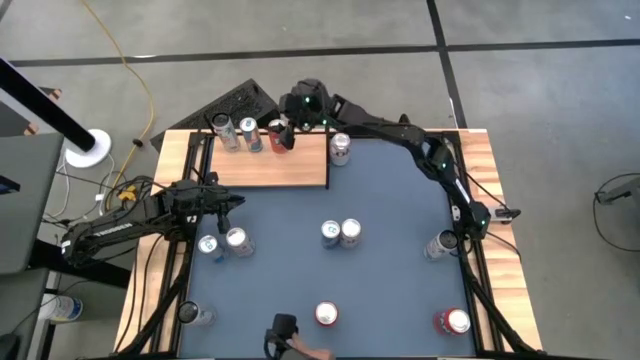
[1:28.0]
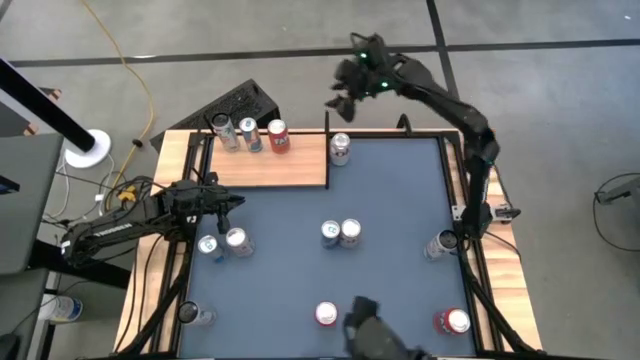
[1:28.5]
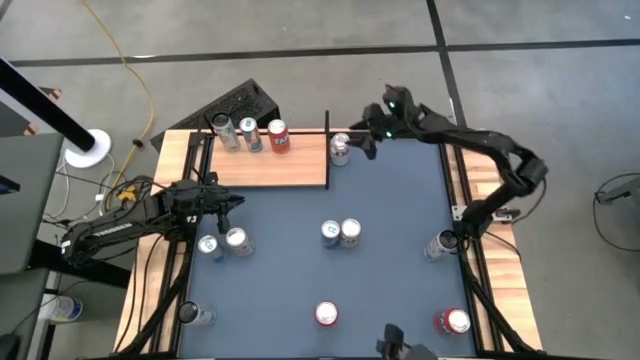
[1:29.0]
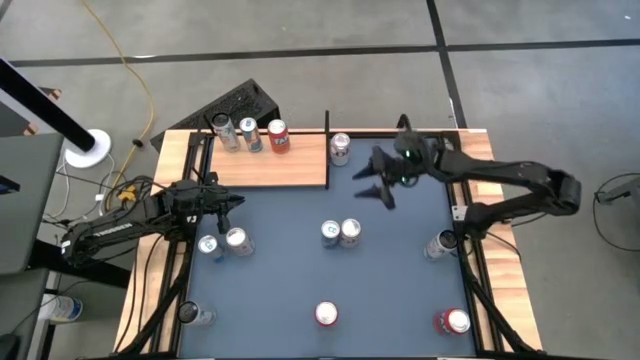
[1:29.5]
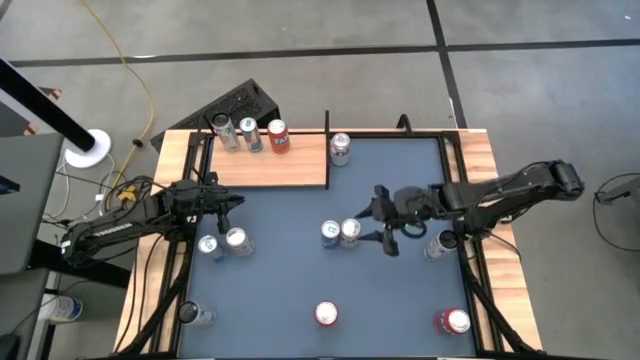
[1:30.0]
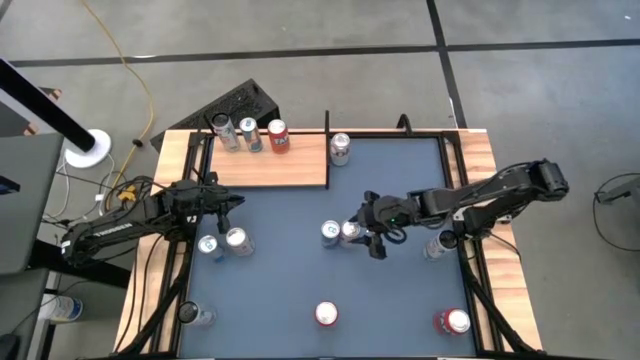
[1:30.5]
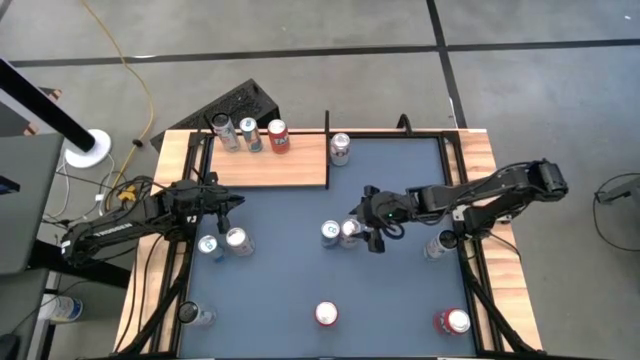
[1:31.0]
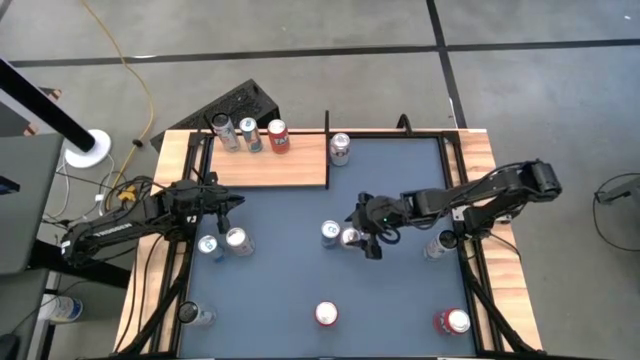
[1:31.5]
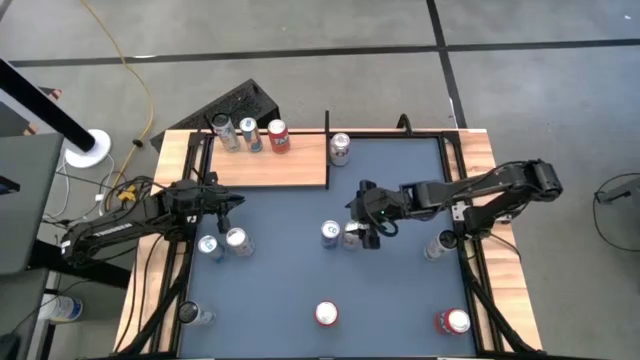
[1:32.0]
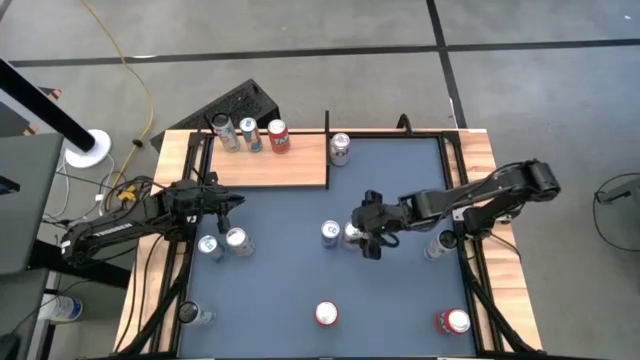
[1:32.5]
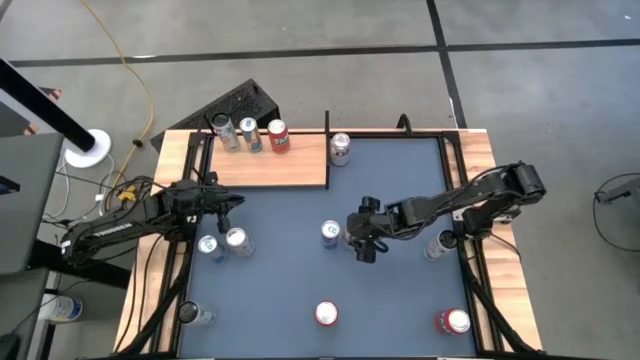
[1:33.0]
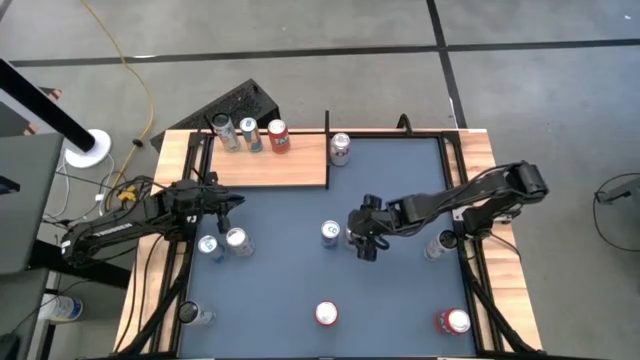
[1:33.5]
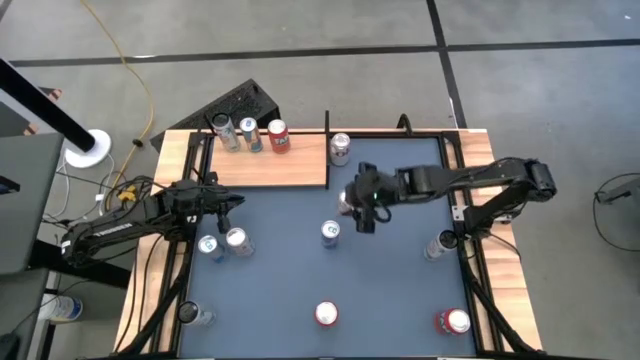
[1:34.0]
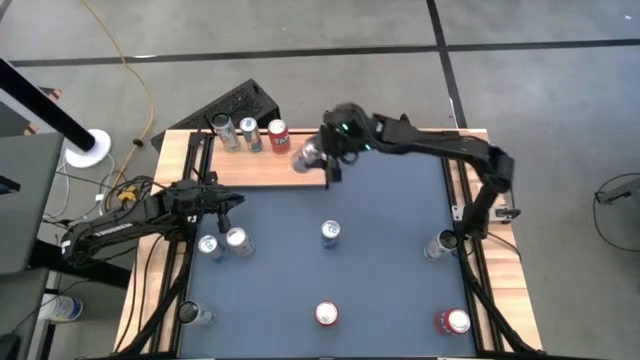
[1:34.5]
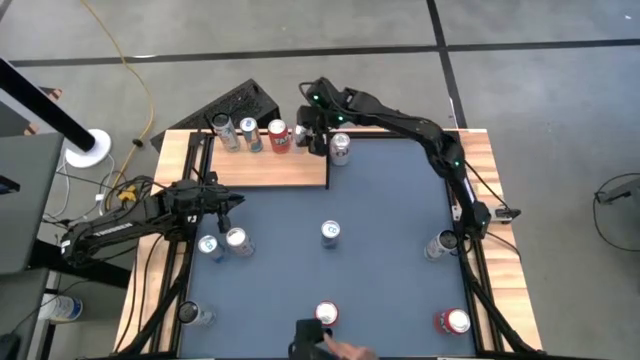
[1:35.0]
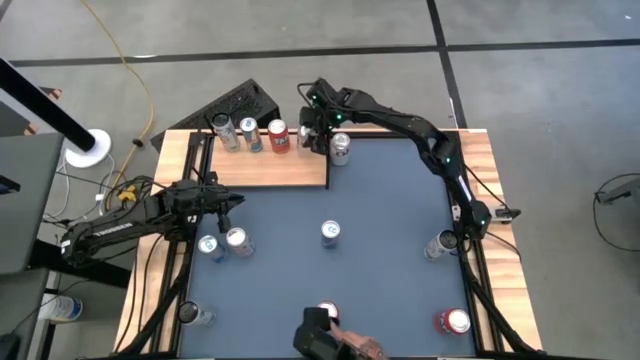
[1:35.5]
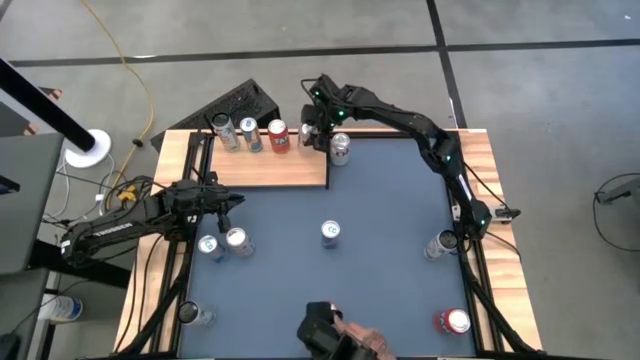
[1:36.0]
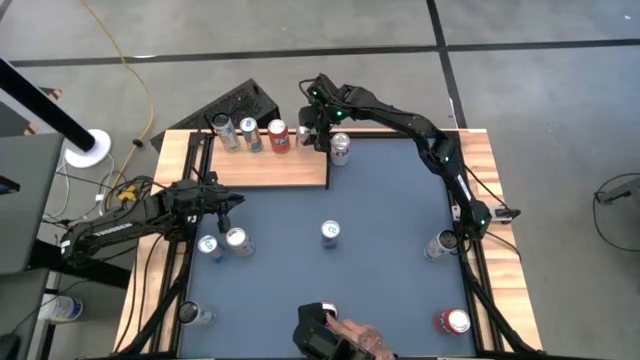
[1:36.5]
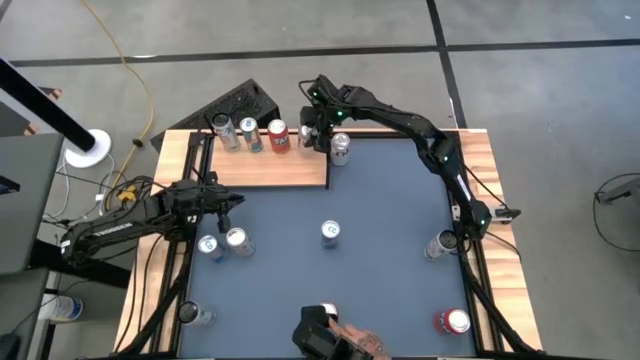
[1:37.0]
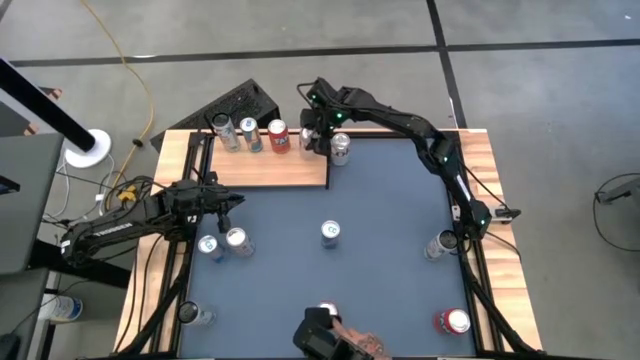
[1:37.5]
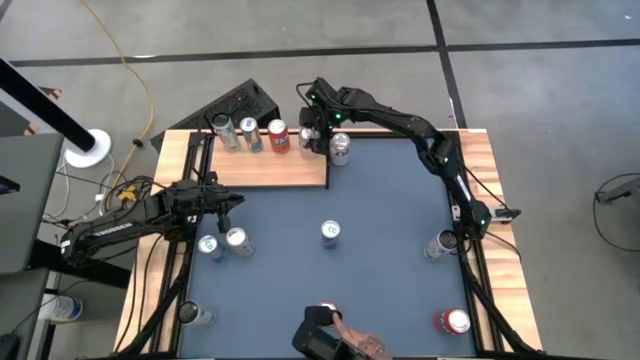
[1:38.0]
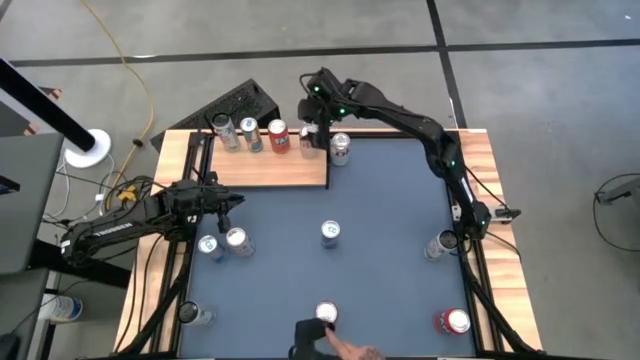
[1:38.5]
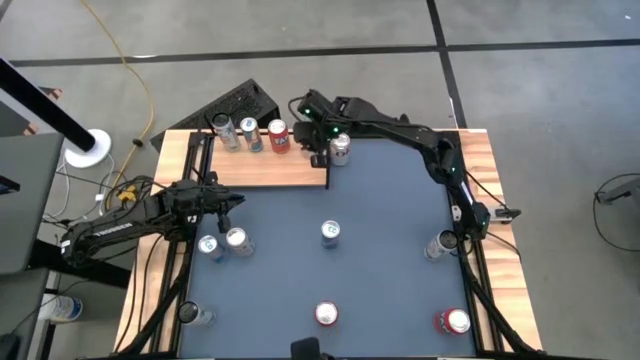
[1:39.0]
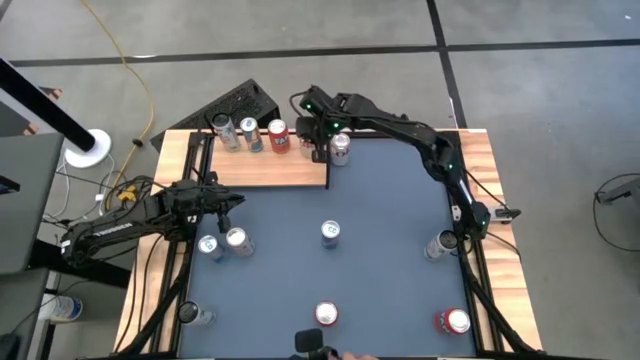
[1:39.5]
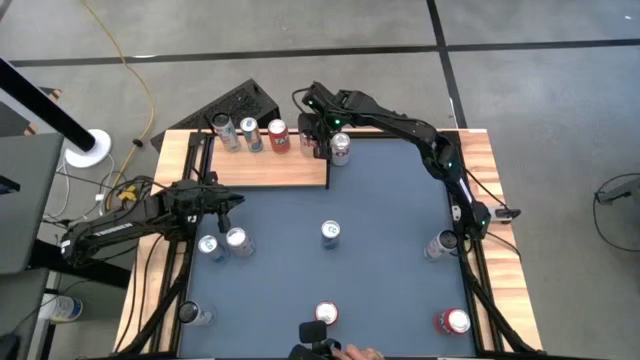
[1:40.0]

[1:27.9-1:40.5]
Task: Place canned beverage on shelf
Put the bottom right silver soda can on the shelf

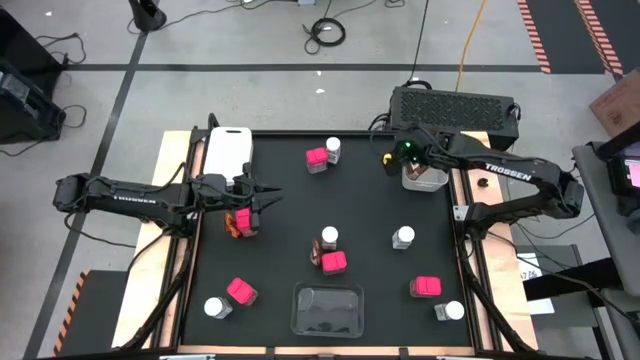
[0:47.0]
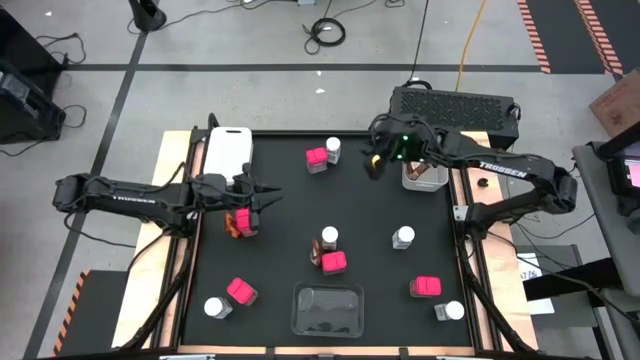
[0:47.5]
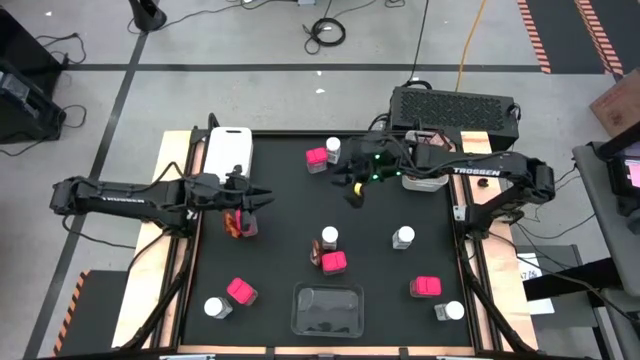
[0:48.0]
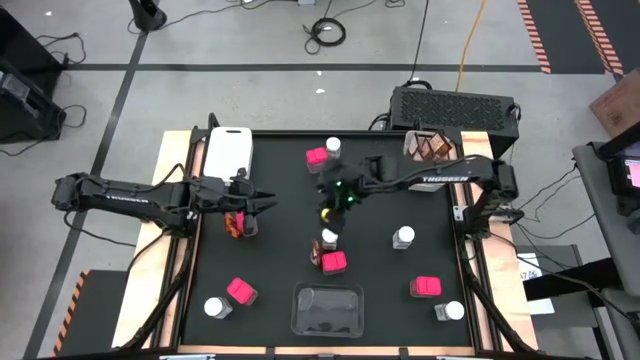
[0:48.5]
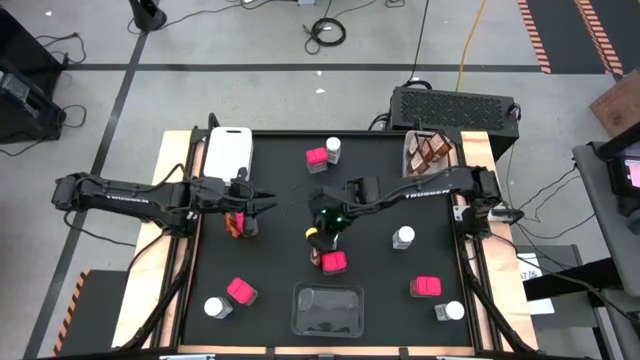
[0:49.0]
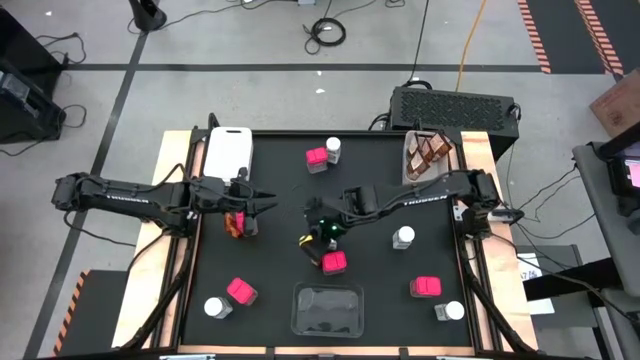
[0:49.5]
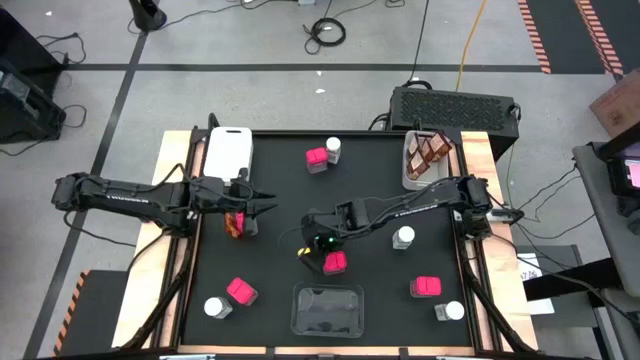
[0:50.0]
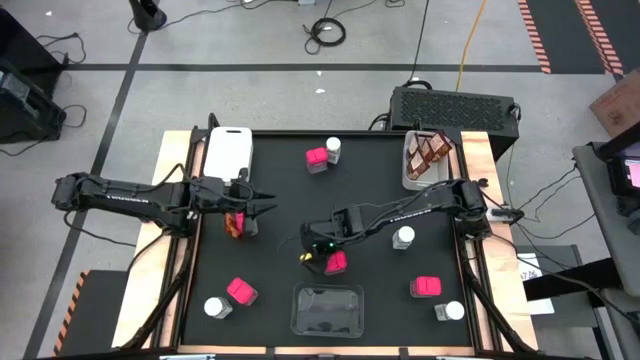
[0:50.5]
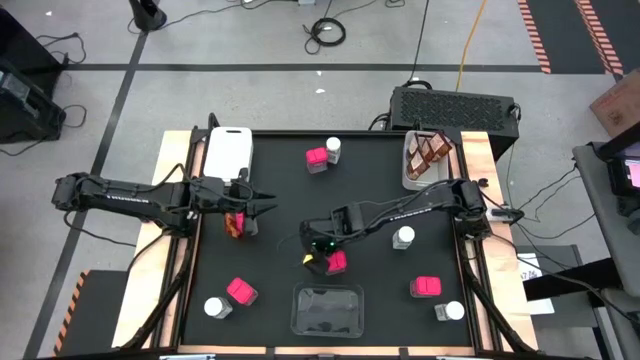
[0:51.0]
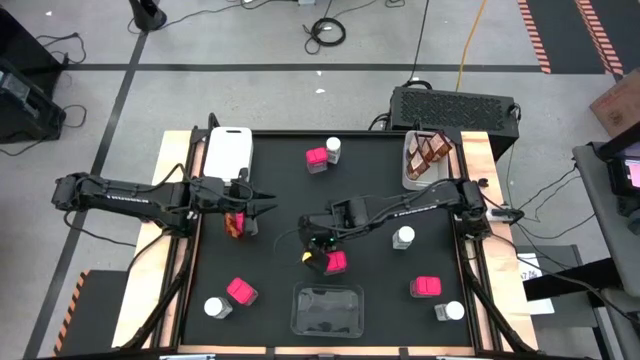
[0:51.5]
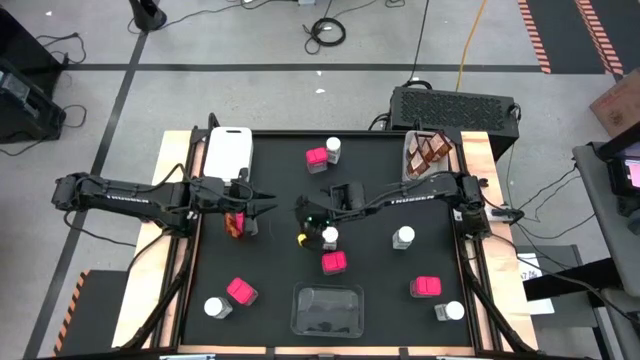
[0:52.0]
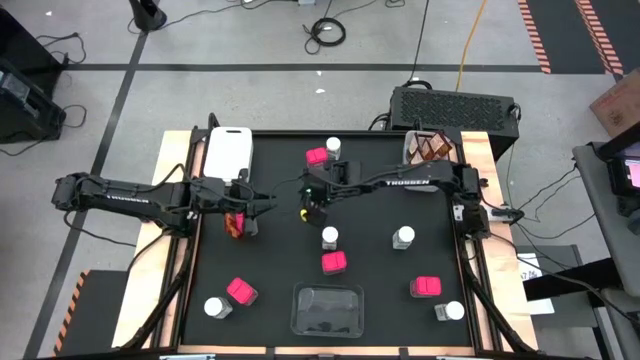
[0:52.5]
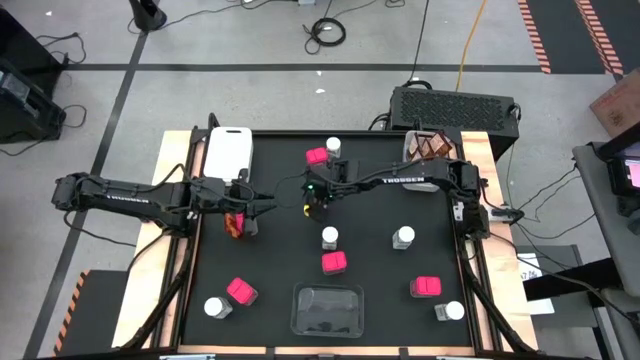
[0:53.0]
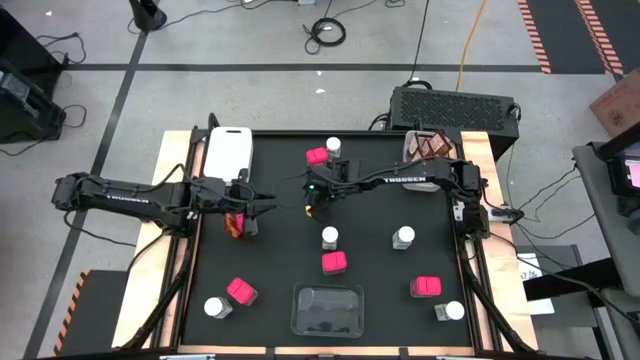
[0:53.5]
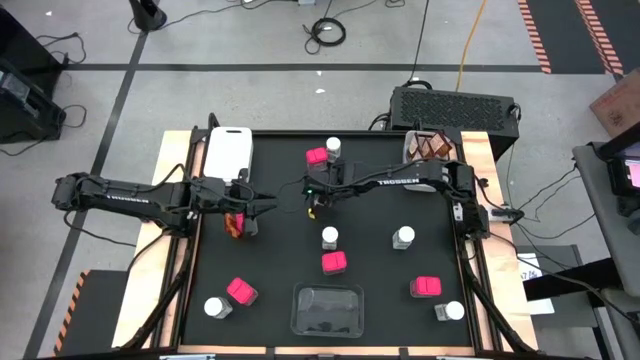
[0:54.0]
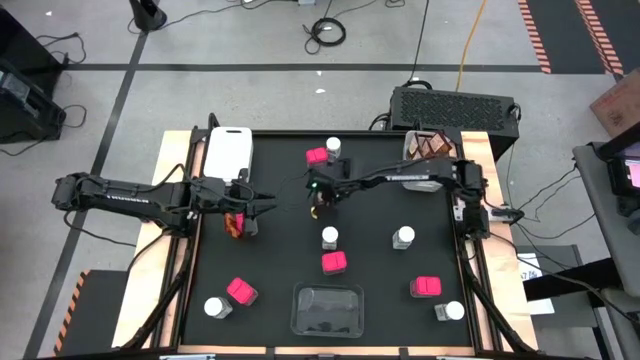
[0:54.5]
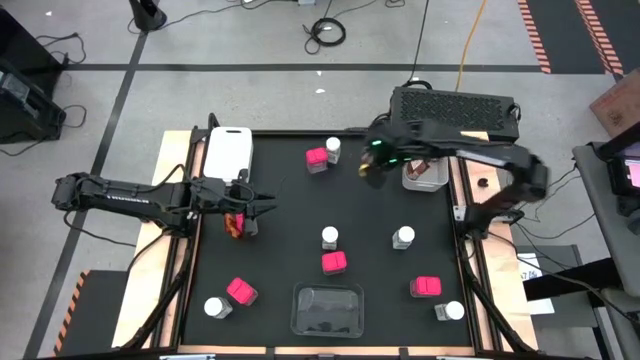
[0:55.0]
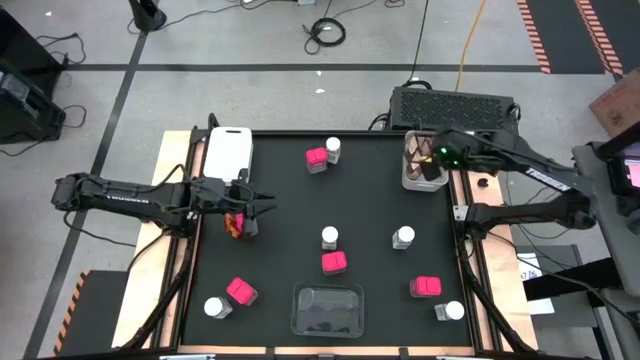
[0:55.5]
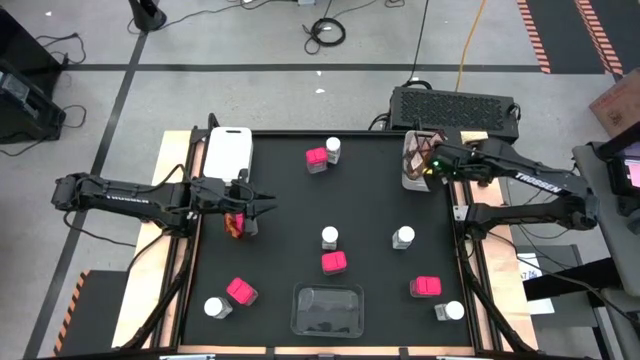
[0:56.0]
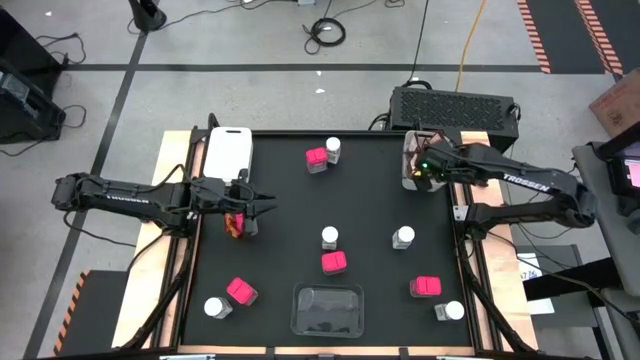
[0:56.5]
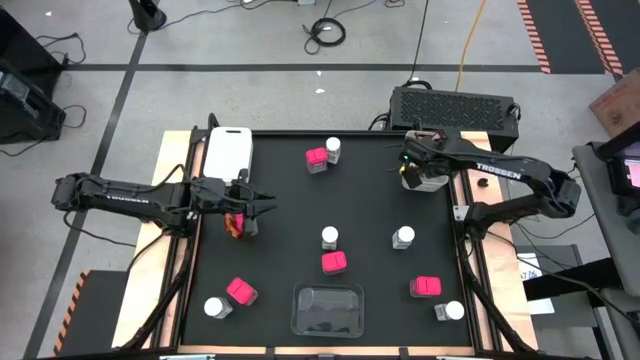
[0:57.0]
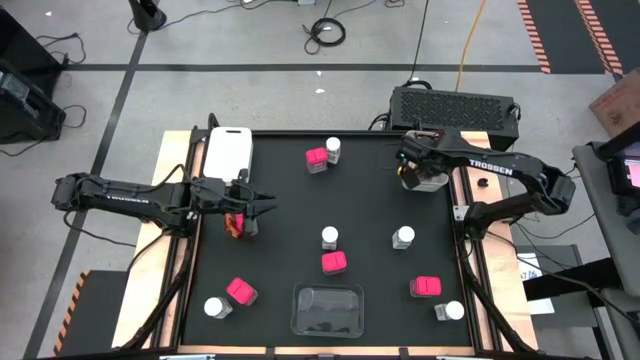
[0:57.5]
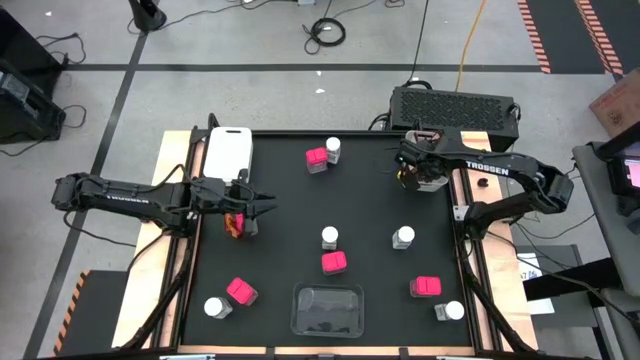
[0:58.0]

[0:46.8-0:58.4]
Task: Sort spices by type
Put the brown seasoning pack into the right white bin
